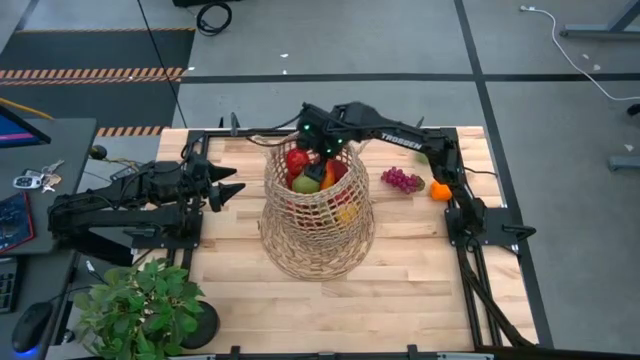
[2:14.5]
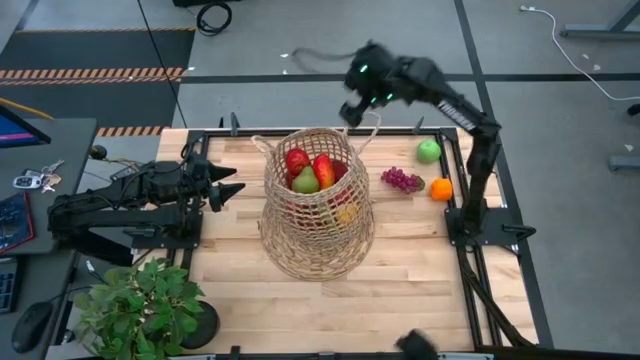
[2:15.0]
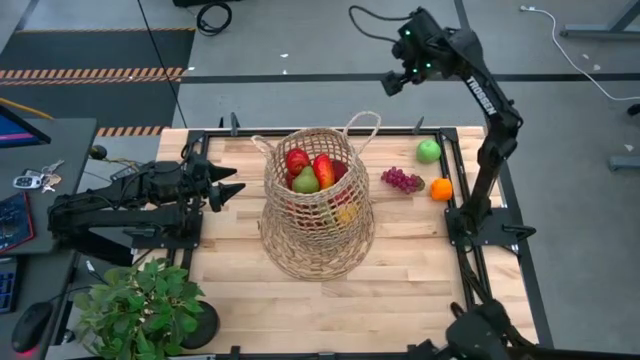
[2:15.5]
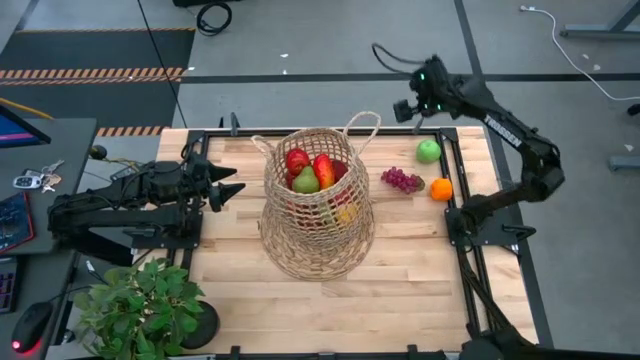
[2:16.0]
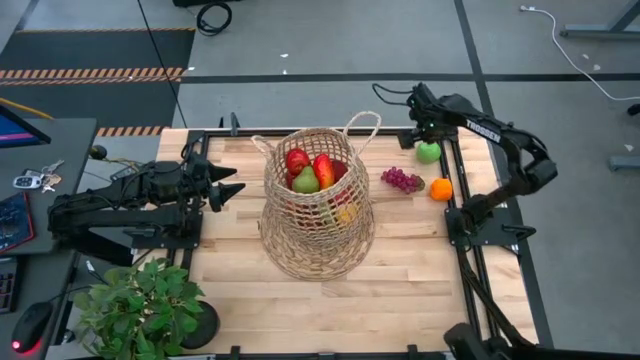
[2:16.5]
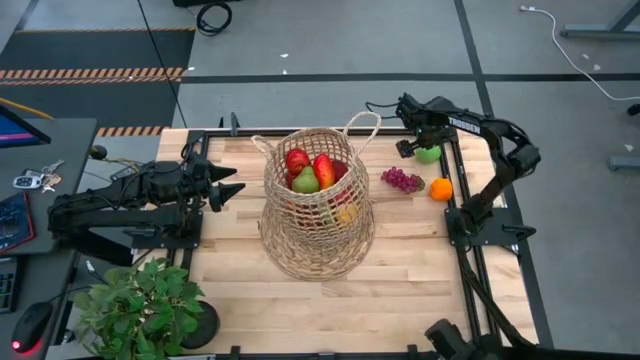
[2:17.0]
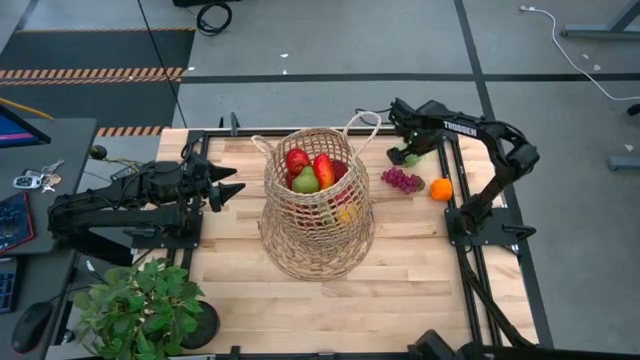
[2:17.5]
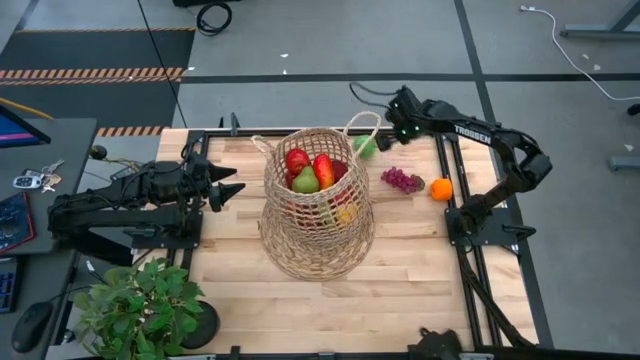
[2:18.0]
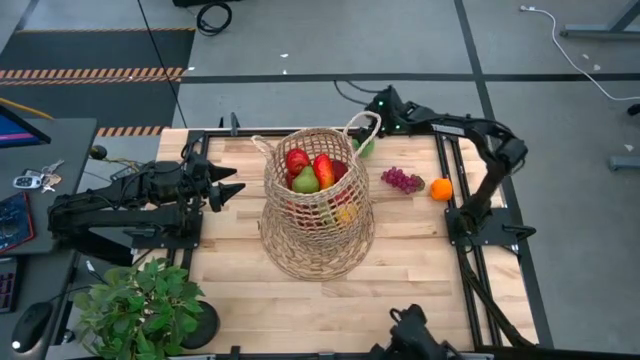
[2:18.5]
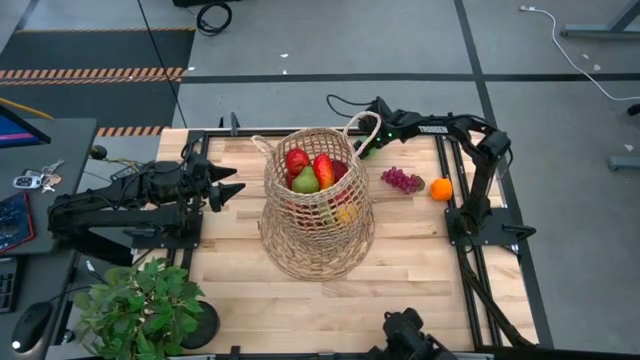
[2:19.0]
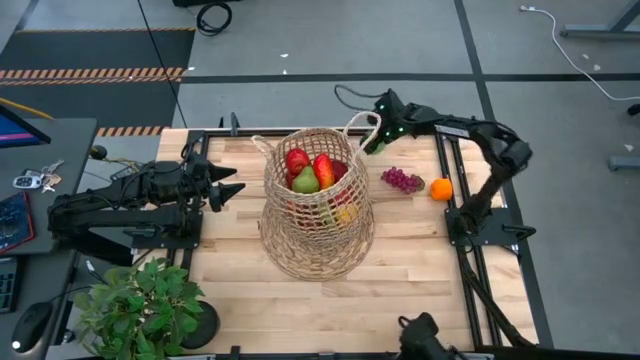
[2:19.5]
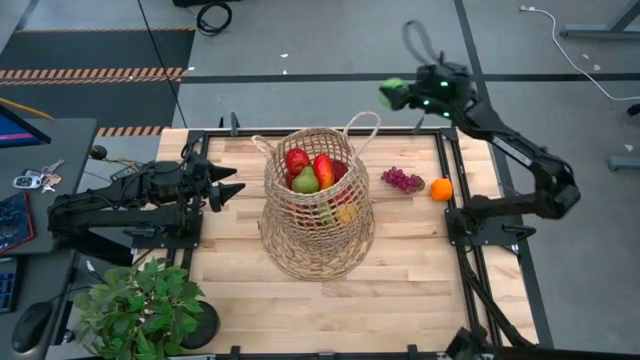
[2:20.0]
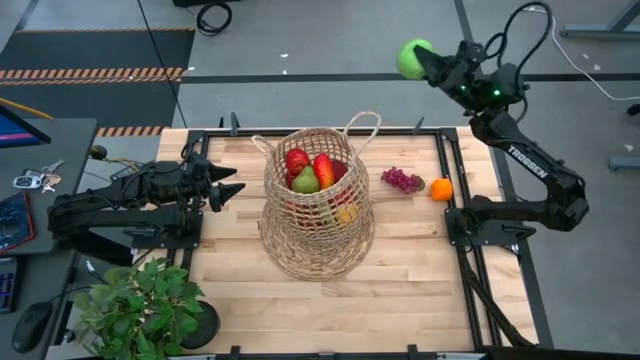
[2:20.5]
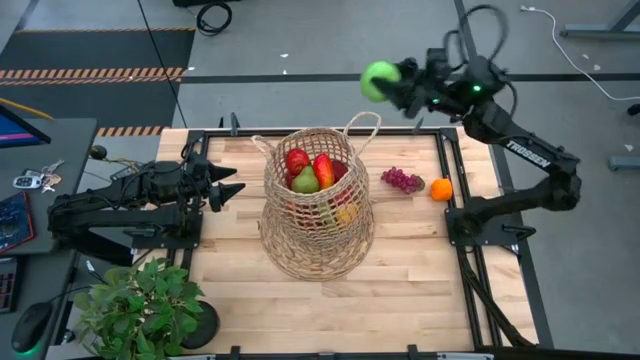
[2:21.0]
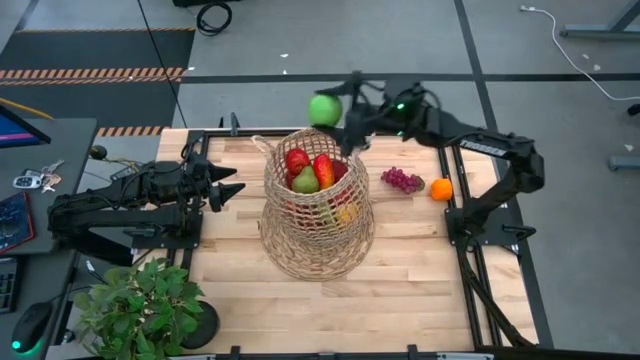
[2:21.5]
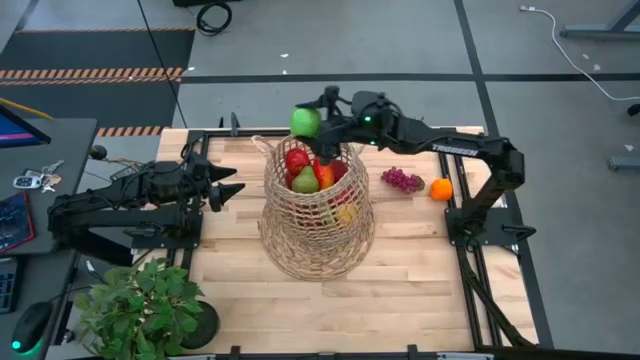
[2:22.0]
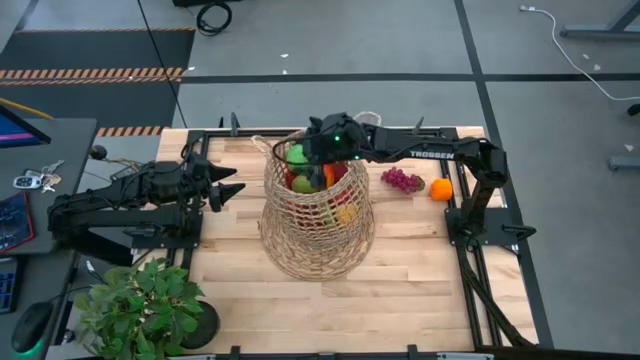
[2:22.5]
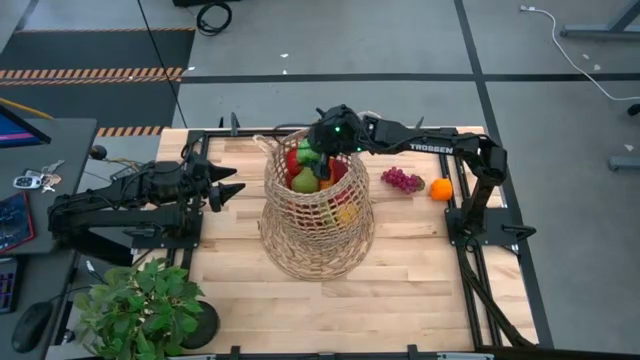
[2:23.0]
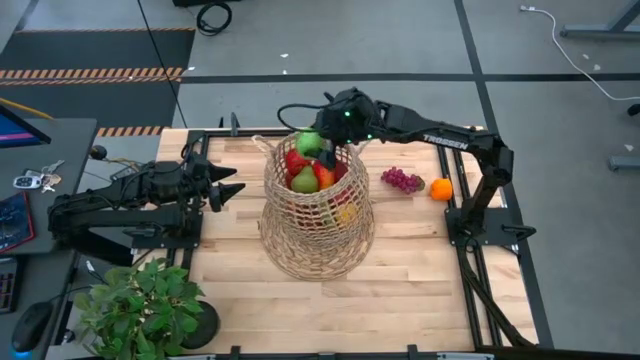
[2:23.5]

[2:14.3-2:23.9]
Task: Build produce basket
Put the green apple into the brown basket

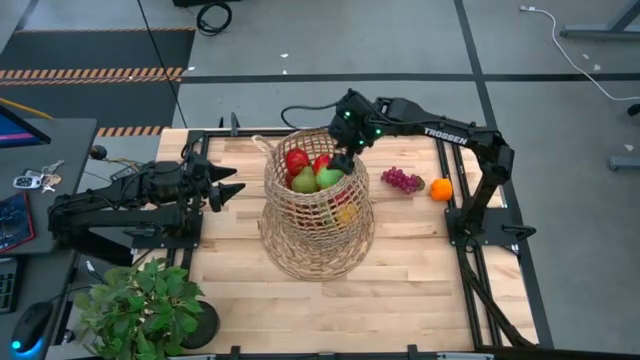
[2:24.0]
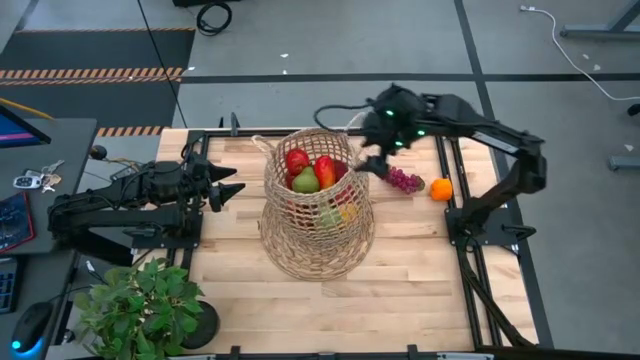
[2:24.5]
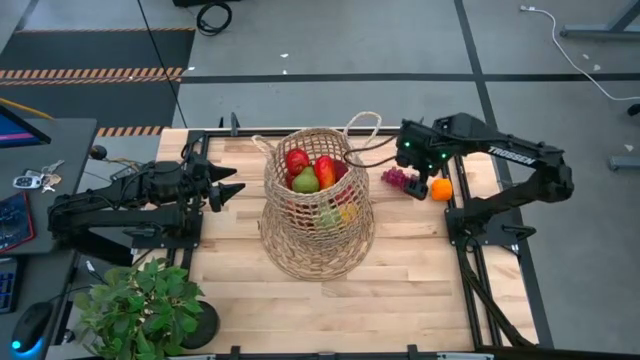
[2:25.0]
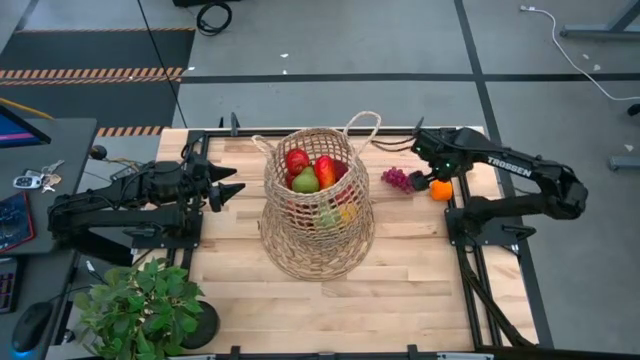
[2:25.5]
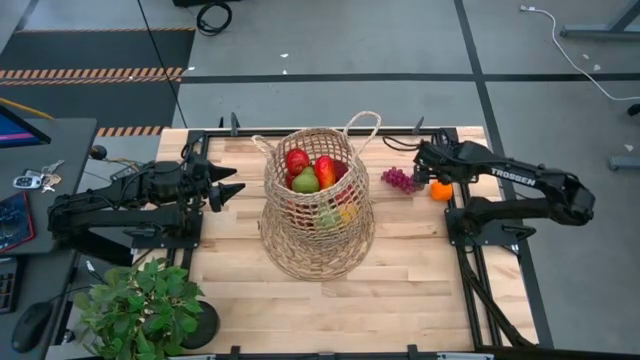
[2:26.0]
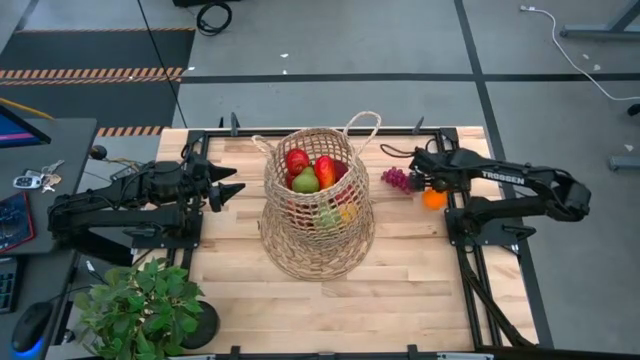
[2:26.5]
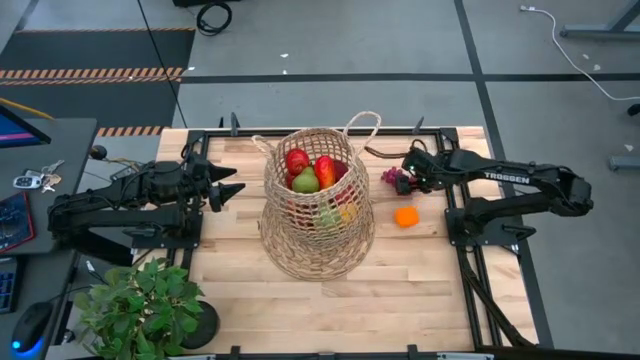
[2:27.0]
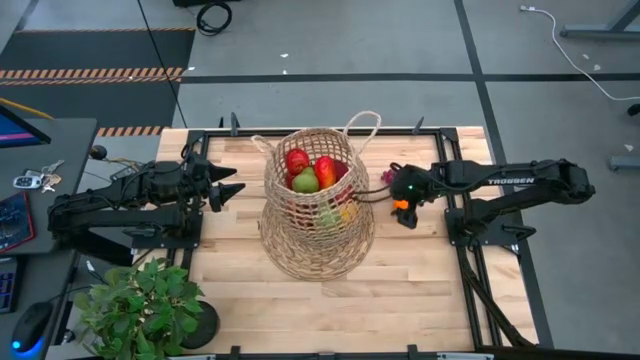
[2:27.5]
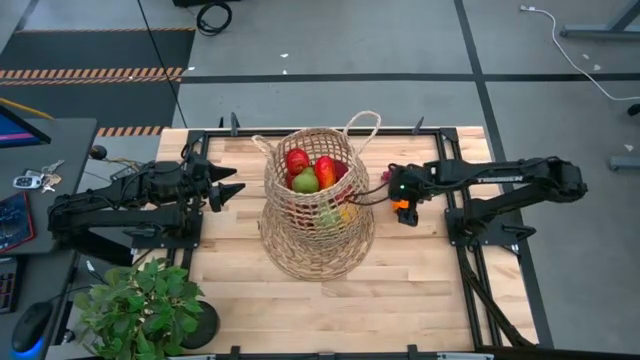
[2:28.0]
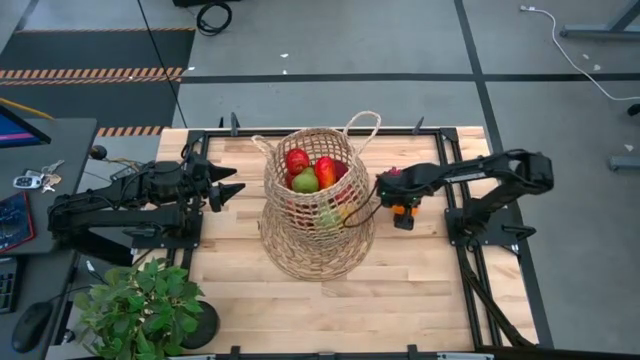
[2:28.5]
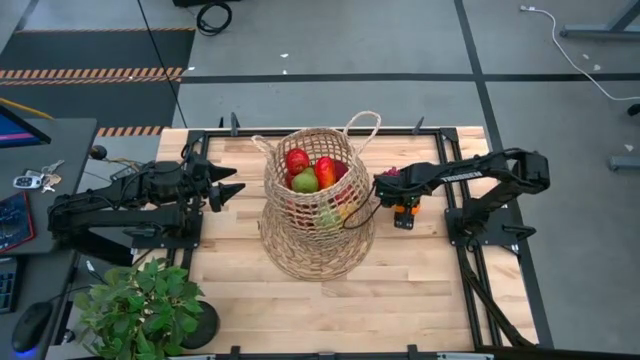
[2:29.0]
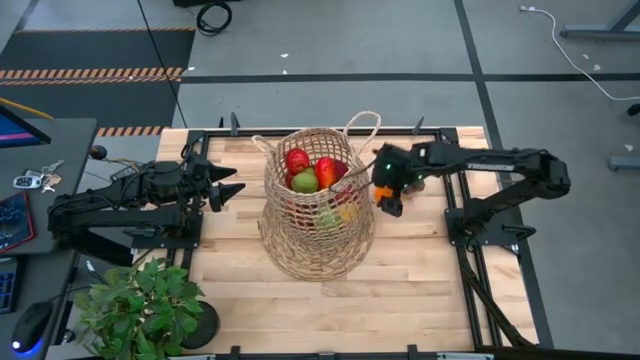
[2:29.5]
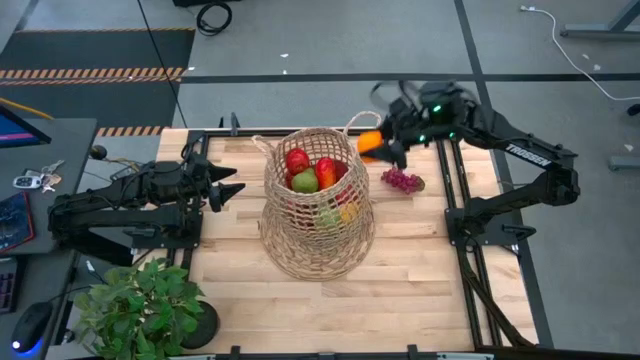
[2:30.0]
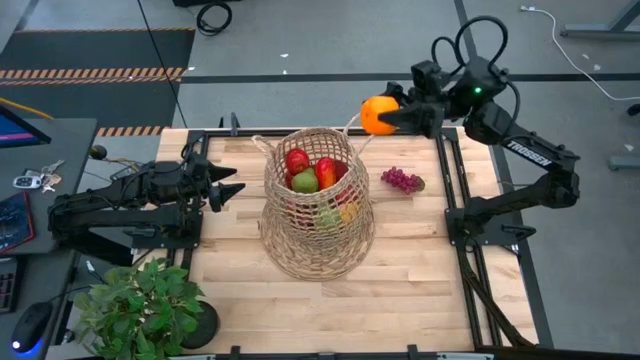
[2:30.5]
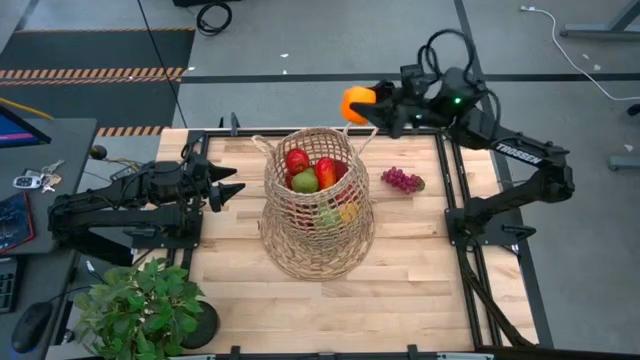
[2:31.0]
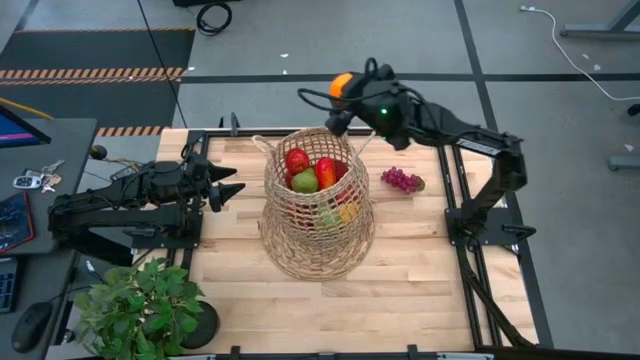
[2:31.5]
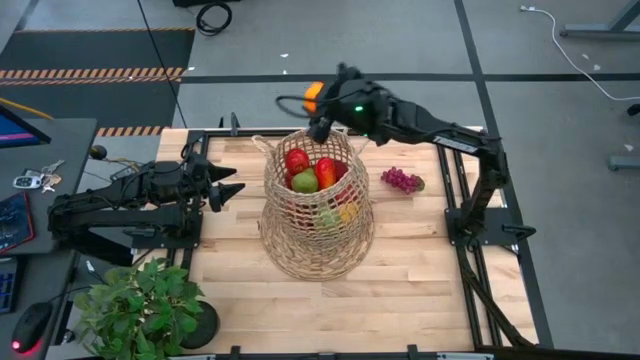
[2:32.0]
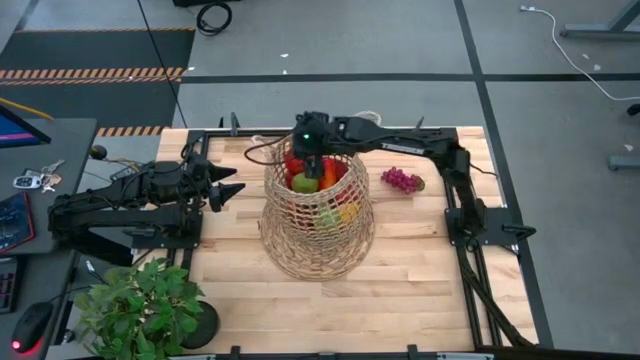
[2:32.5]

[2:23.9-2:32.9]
Put the orange into the brown basket

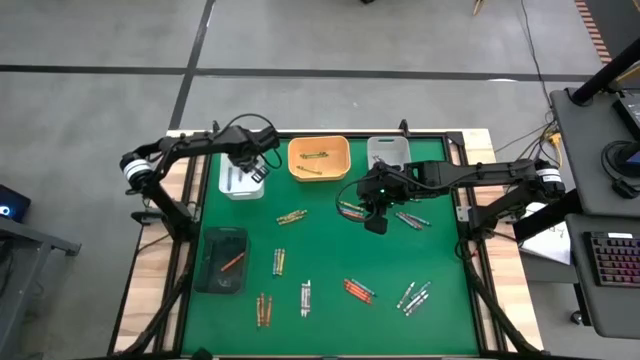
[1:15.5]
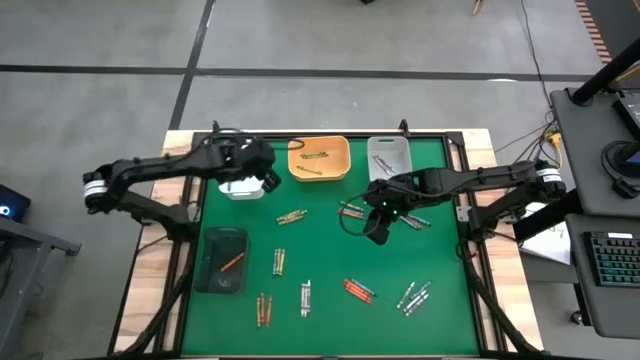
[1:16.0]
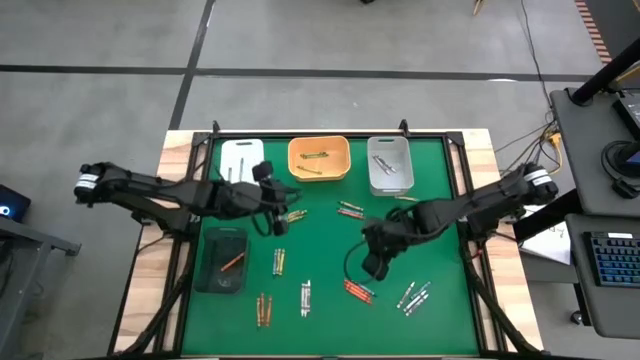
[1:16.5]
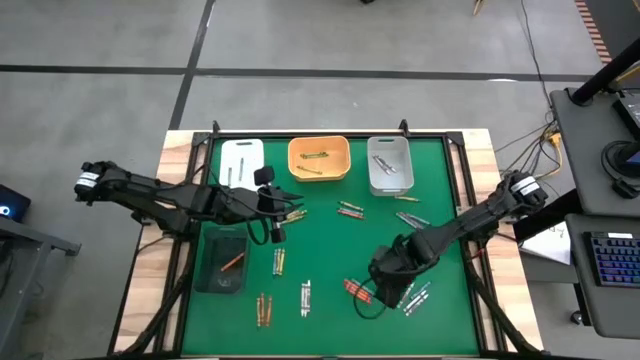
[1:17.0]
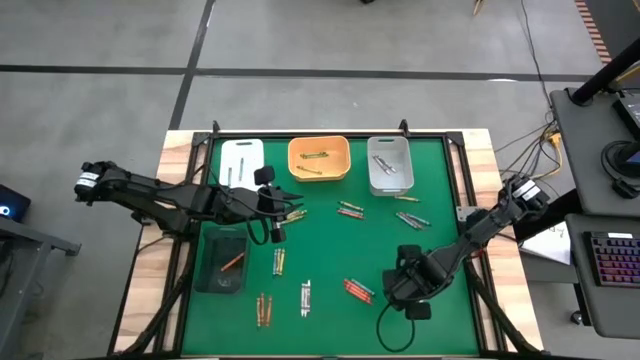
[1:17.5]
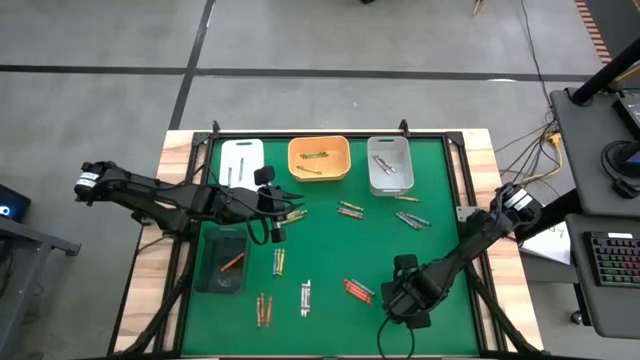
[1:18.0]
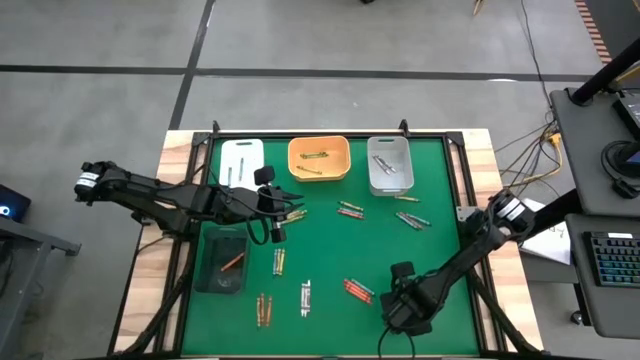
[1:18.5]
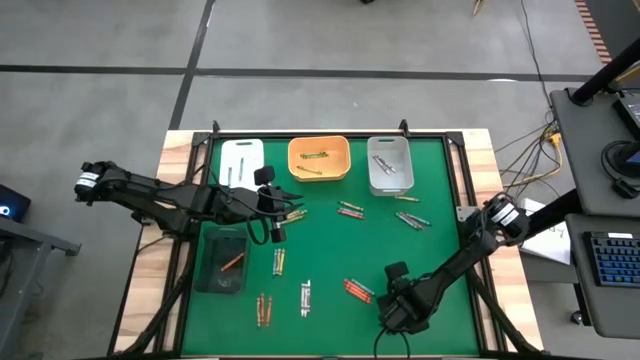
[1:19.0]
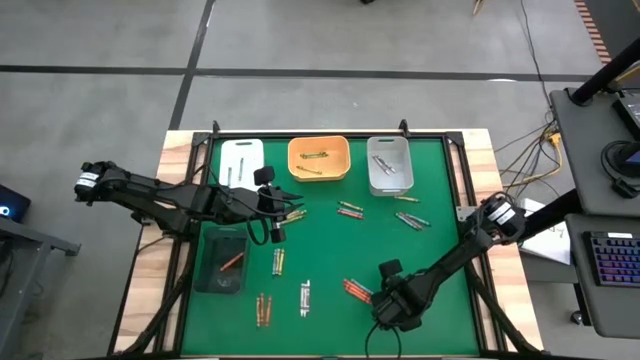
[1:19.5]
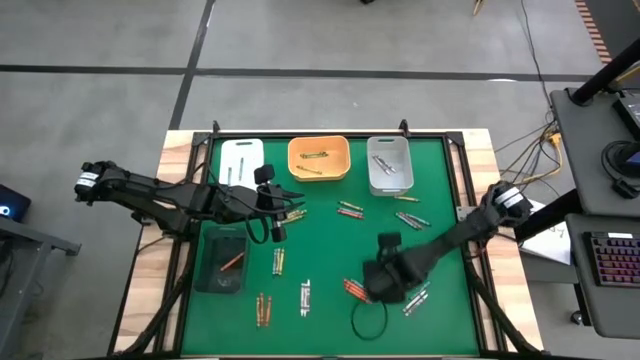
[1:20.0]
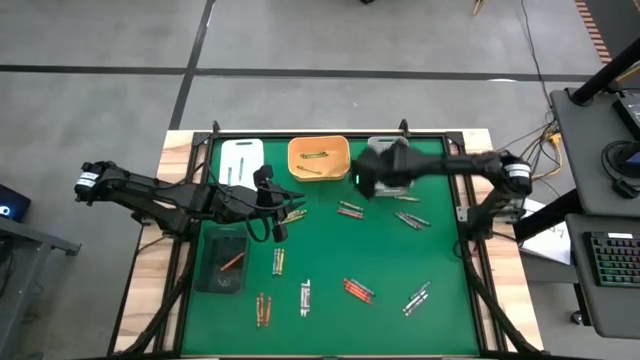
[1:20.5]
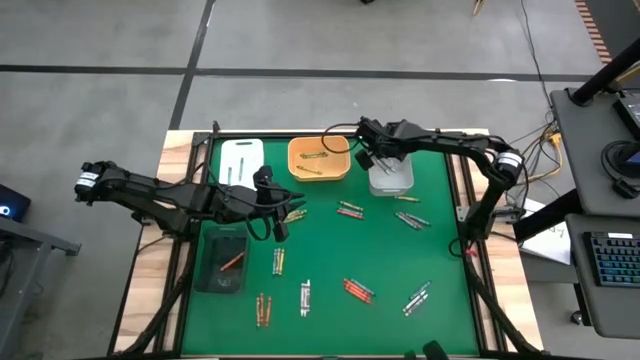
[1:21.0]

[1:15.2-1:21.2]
Task: Sort crayons
Put the white crayon into the gray bin
